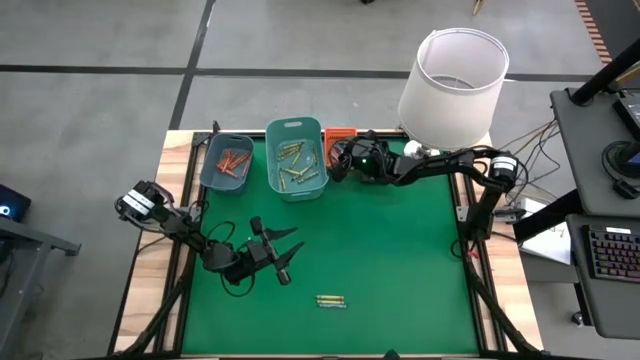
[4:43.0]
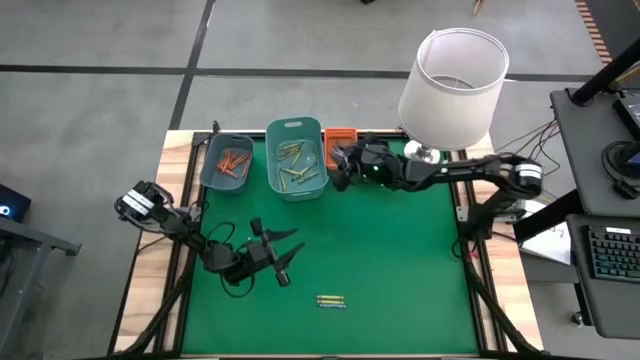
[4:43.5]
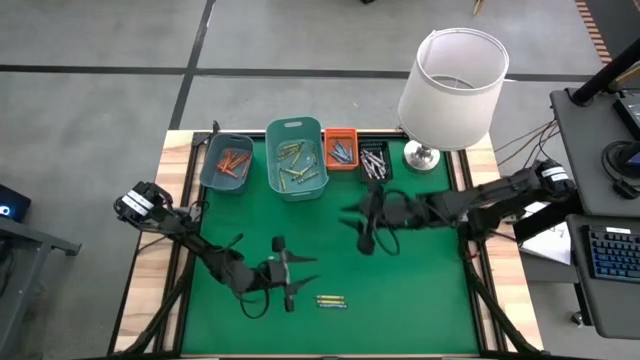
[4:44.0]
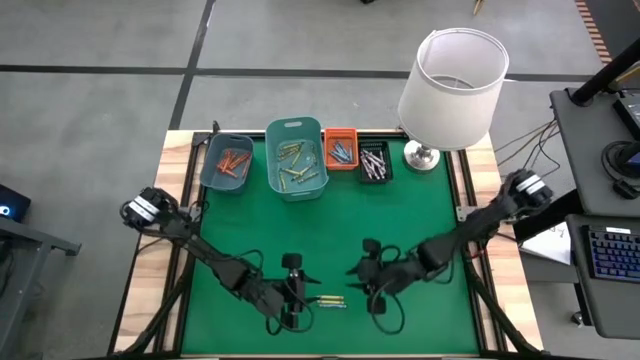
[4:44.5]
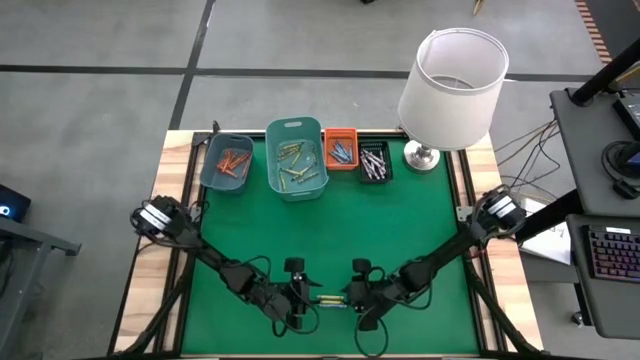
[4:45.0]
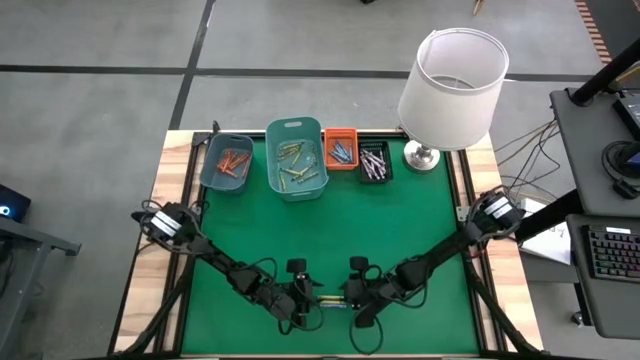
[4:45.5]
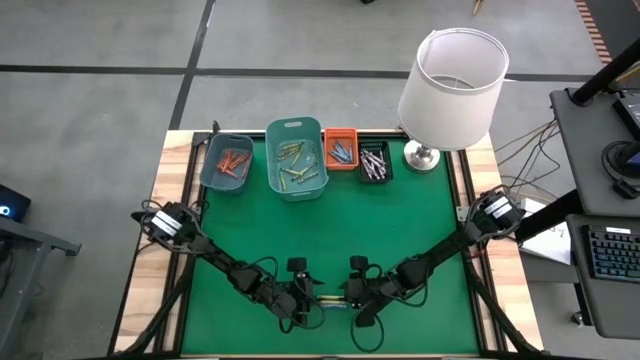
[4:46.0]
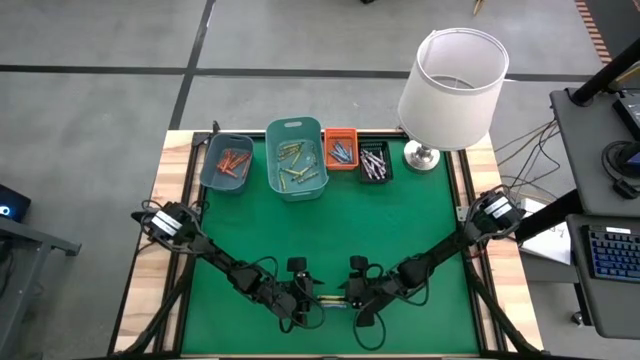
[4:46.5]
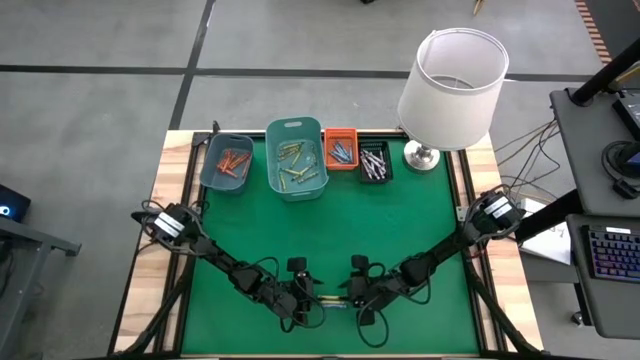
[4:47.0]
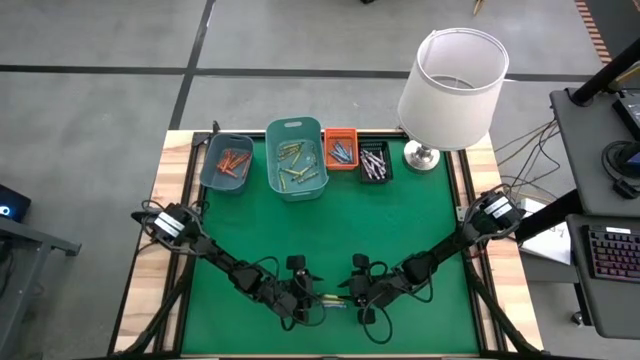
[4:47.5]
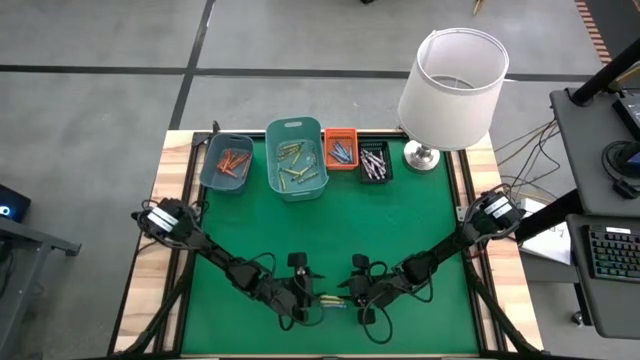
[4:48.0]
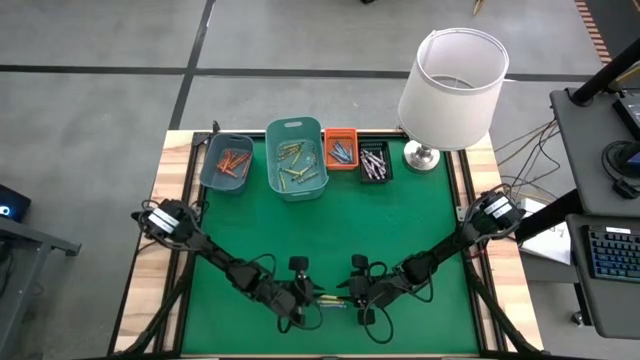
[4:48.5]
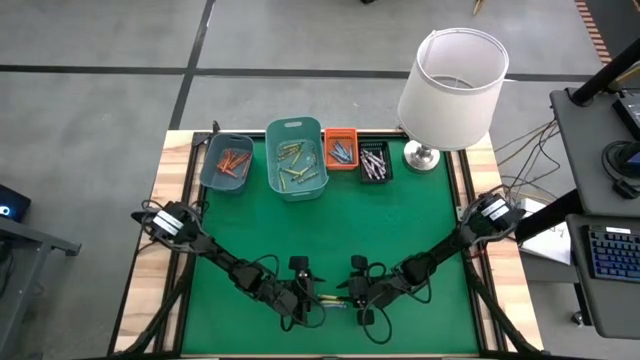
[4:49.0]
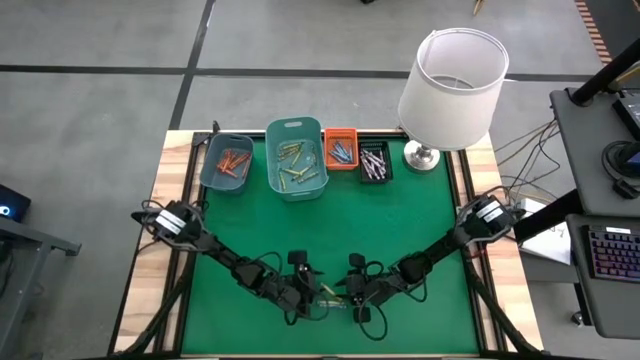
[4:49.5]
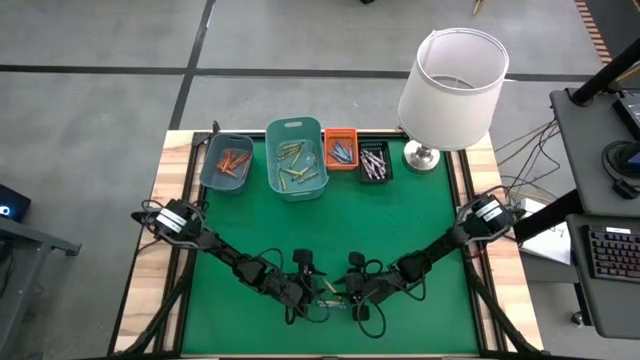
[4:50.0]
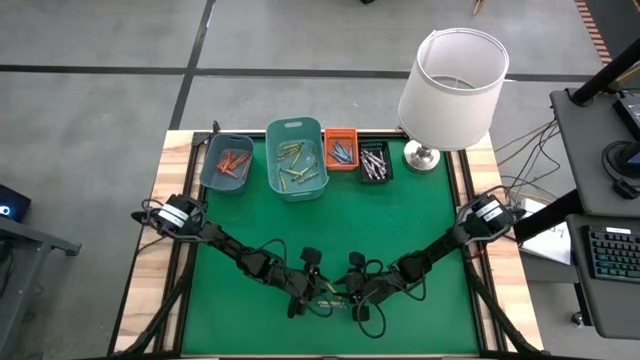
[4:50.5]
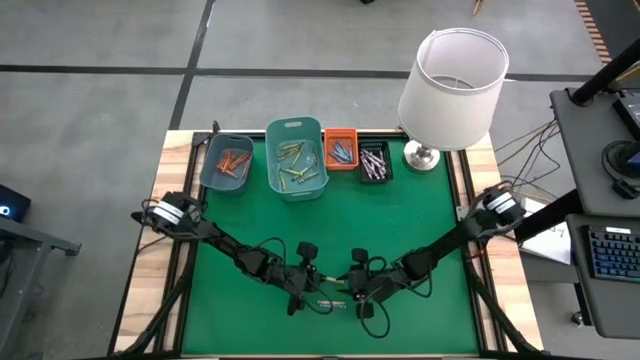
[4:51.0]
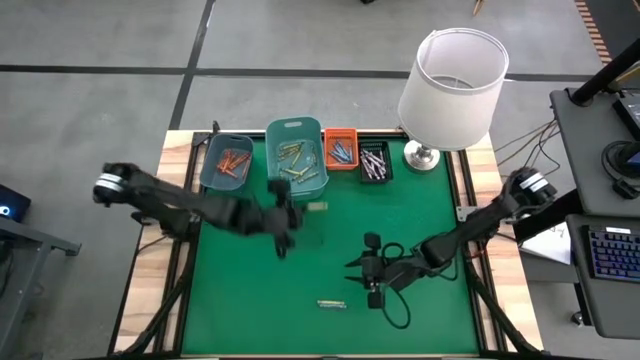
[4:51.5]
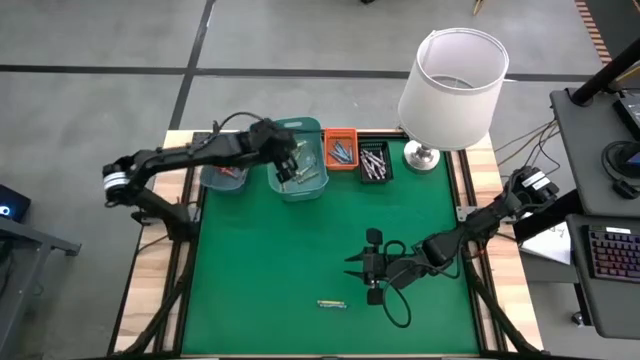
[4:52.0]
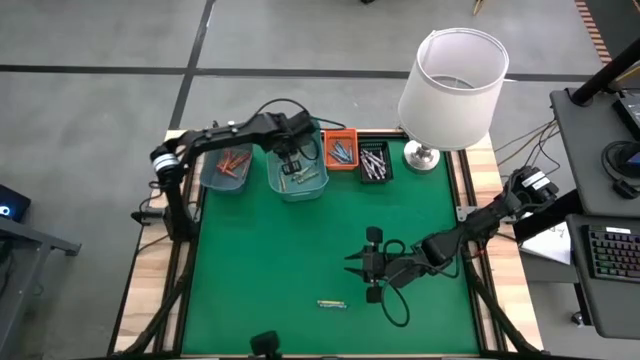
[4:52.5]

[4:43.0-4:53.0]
Task: Sort crayons
Put the green crayon into the green bin

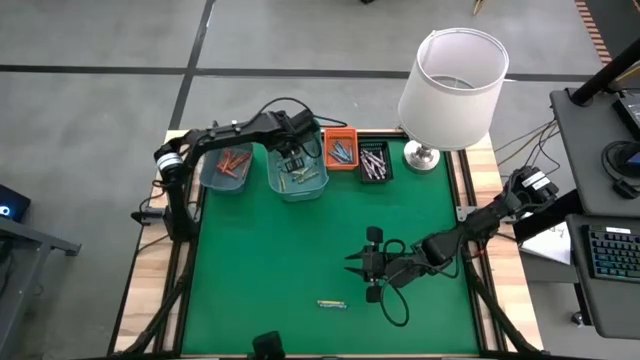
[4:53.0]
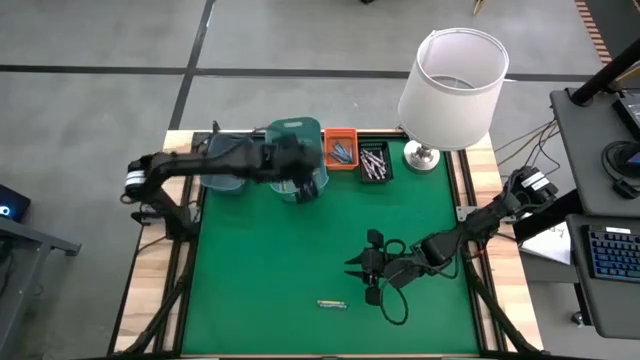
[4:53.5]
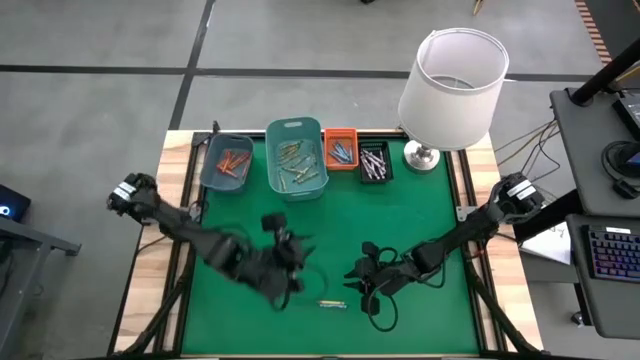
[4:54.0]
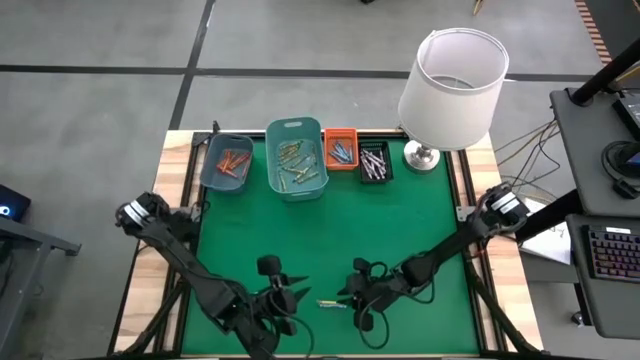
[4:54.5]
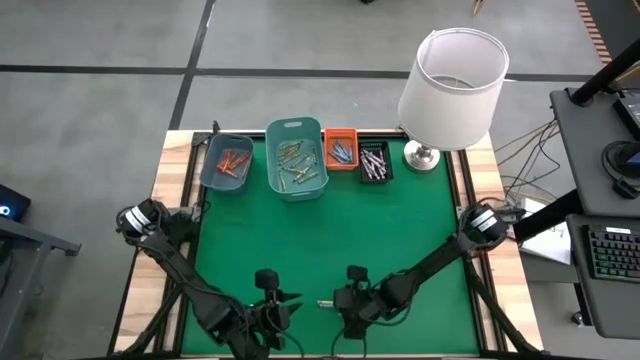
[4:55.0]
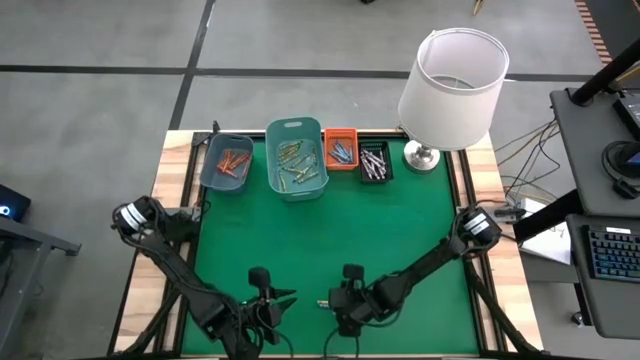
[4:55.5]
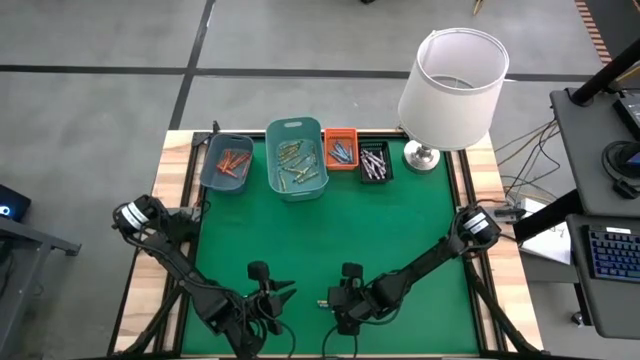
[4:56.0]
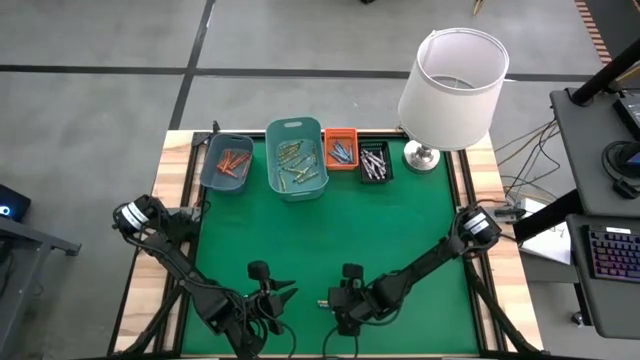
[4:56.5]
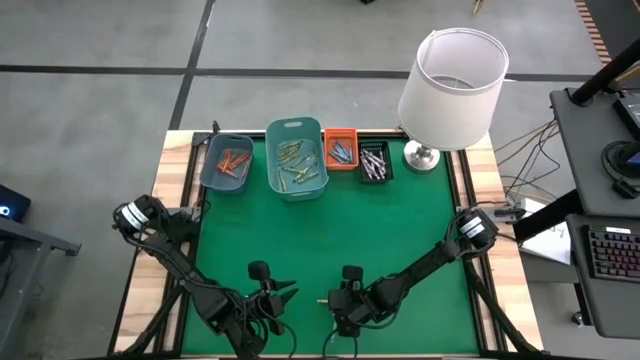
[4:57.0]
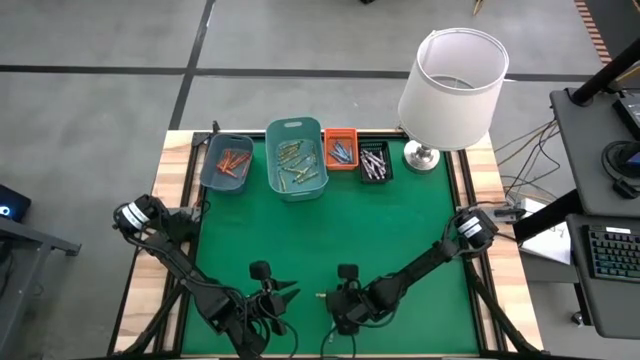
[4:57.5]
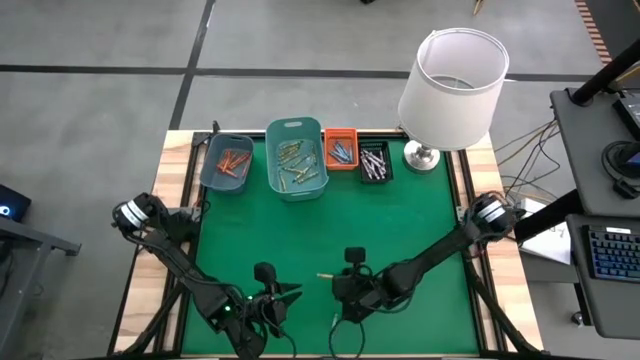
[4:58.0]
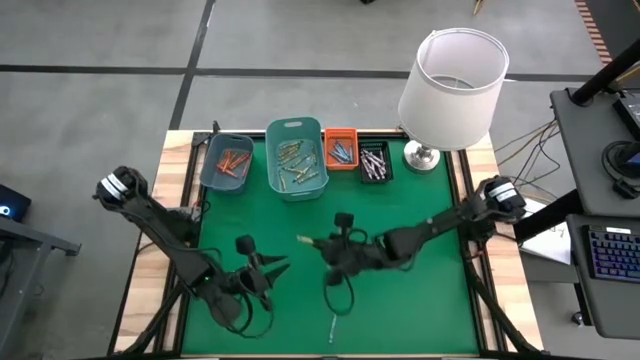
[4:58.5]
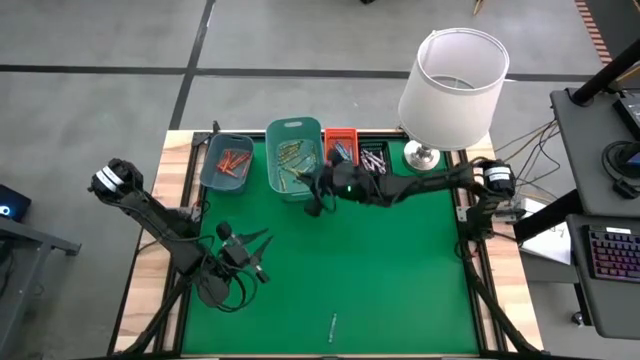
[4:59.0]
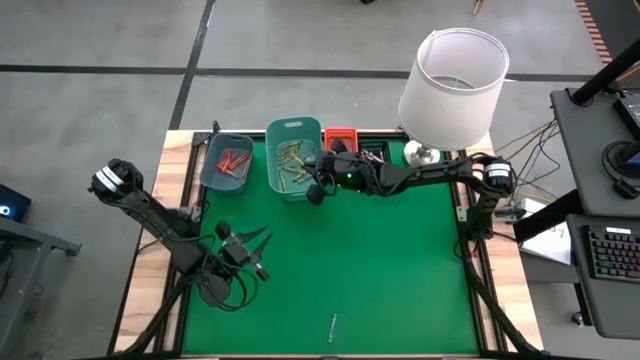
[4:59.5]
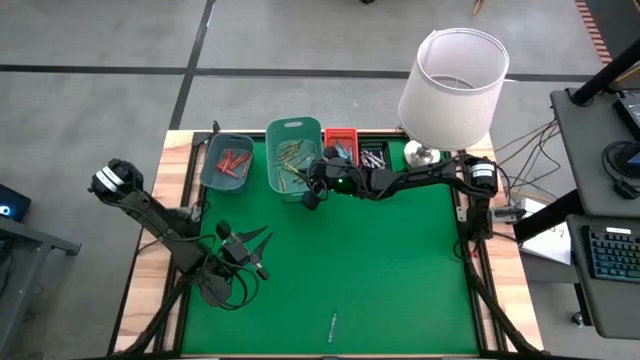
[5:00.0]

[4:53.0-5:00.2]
Put the green crayon into the green bin

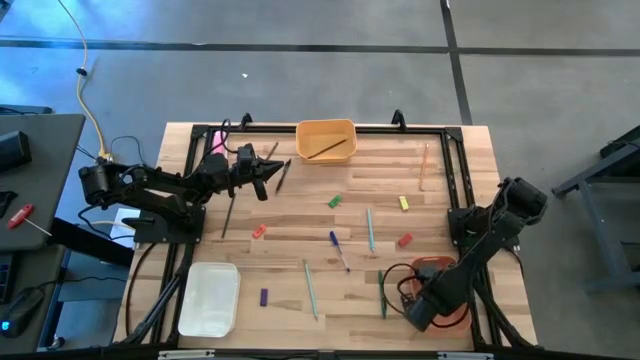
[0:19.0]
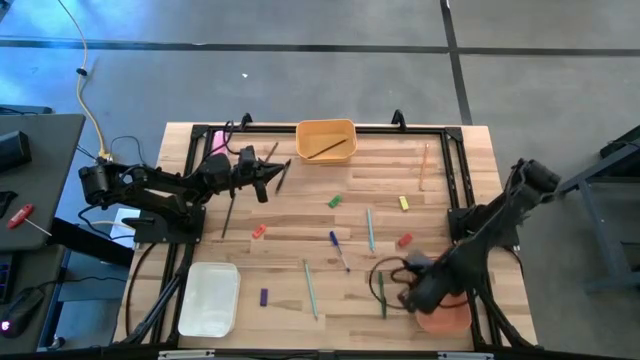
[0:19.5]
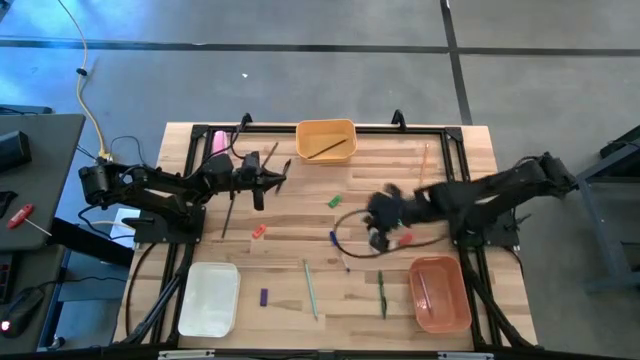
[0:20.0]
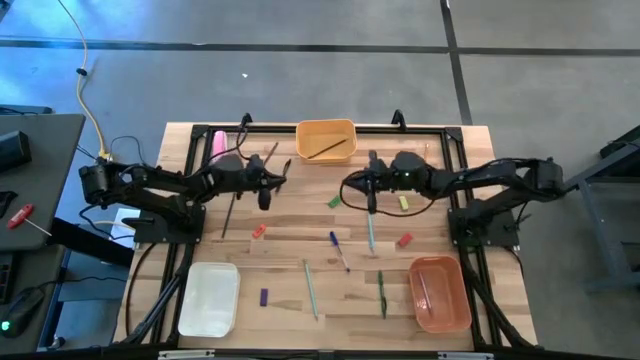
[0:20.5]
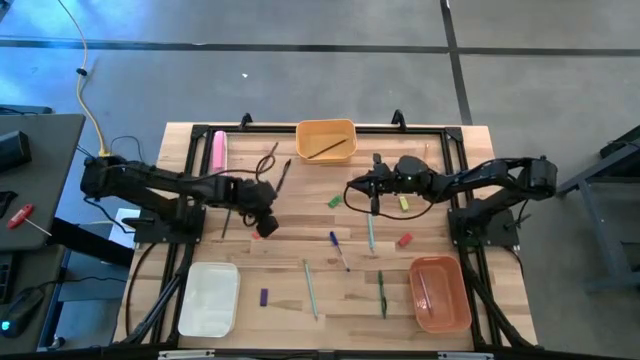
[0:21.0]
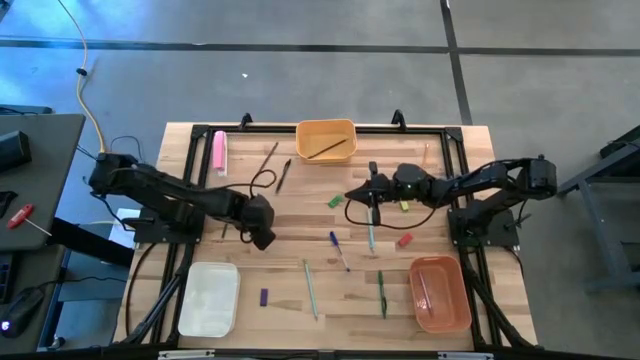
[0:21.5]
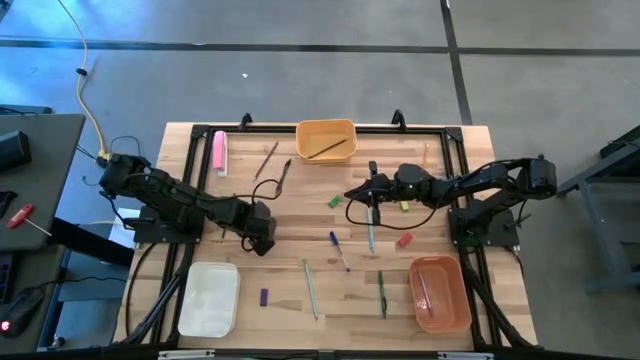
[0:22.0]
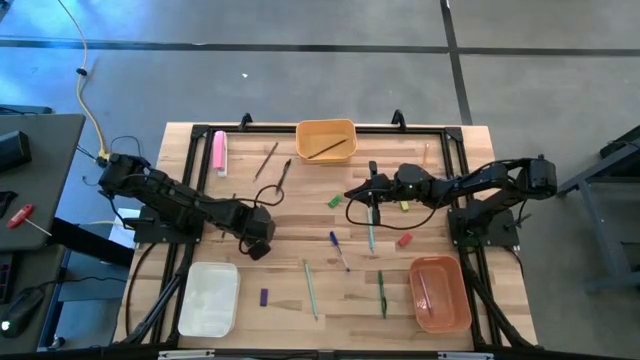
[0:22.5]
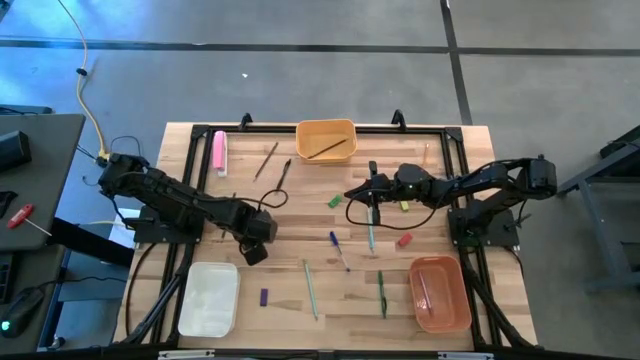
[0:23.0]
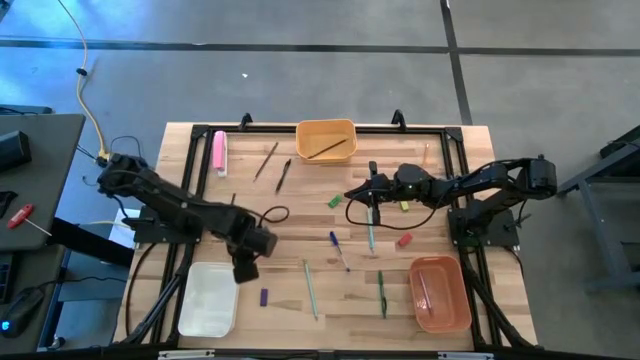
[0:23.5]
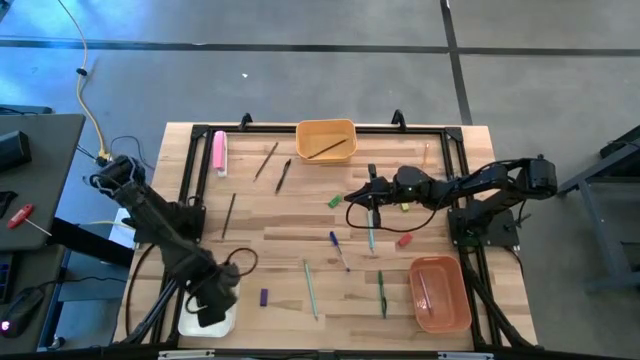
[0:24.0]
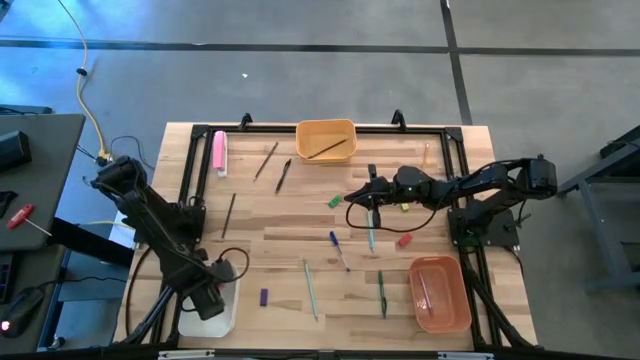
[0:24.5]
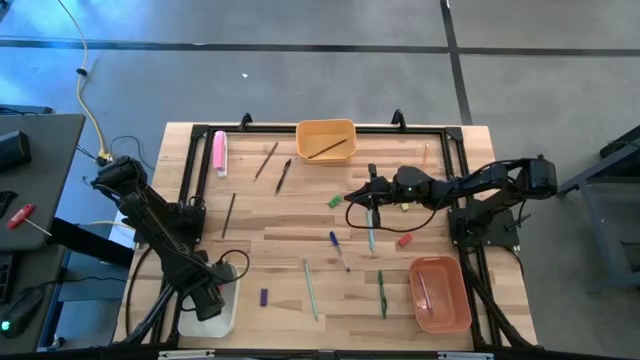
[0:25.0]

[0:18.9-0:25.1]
Task: Sort crayons/erasers/pens/pencils in bins
Put the orange eraser into the white bin
